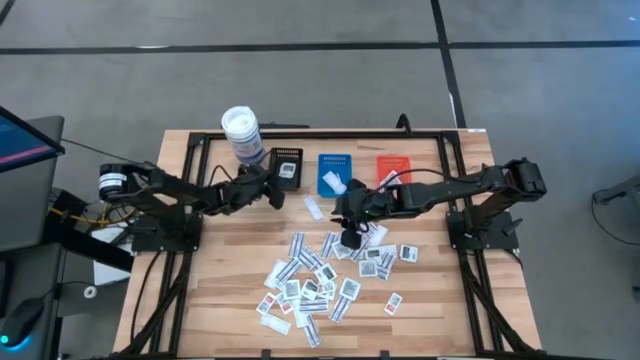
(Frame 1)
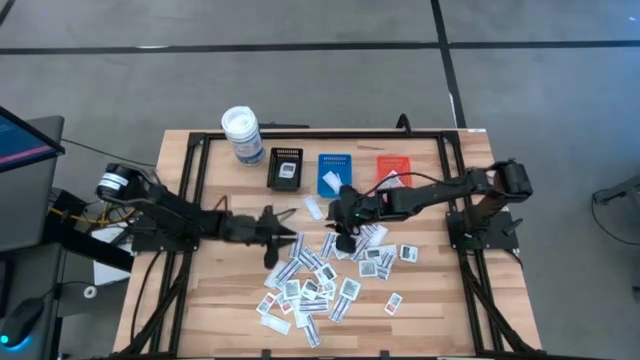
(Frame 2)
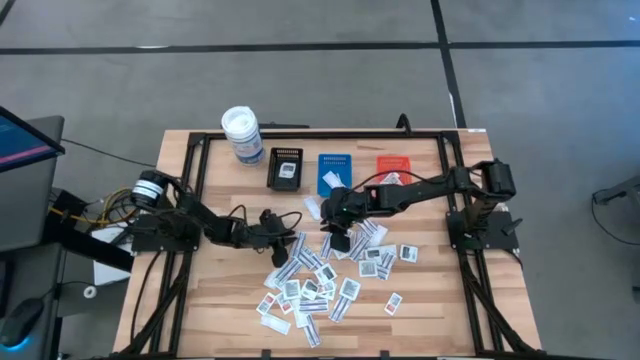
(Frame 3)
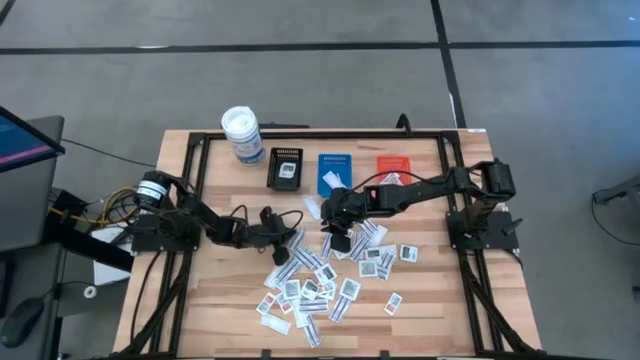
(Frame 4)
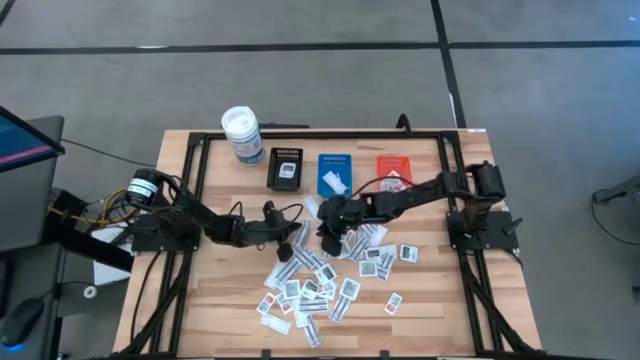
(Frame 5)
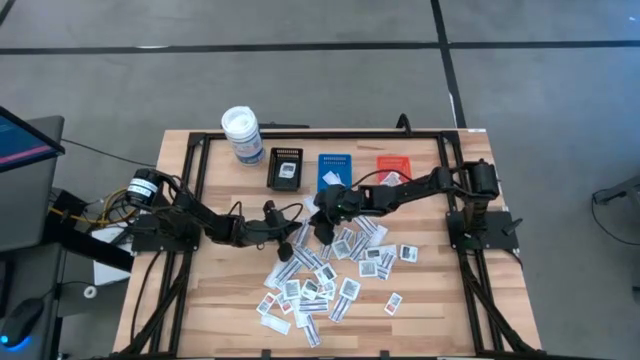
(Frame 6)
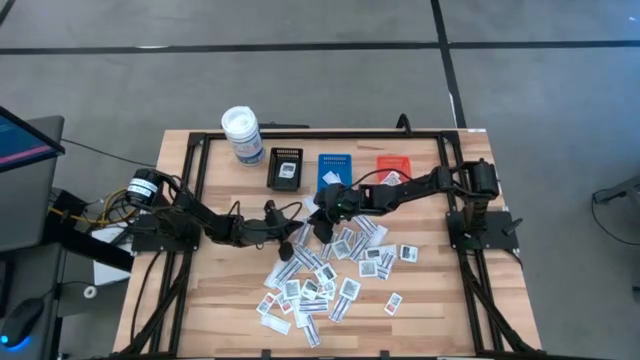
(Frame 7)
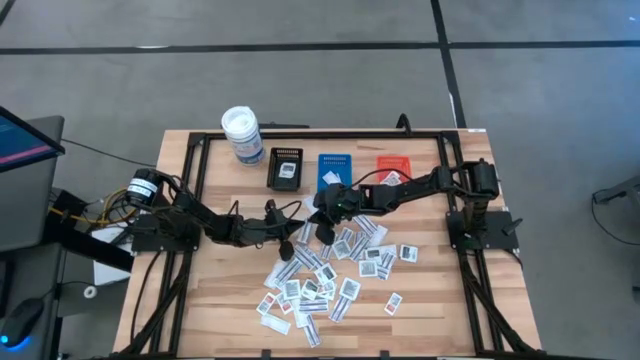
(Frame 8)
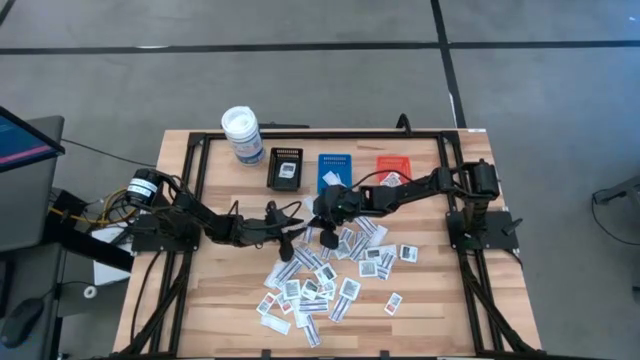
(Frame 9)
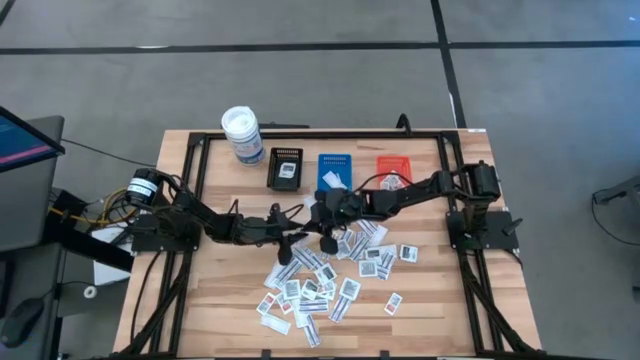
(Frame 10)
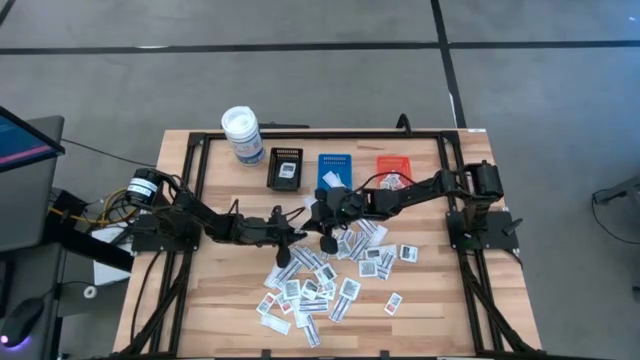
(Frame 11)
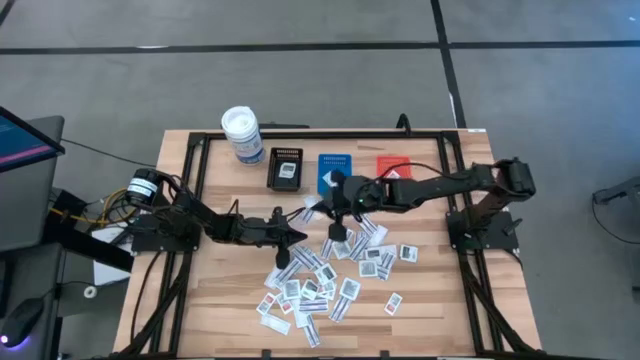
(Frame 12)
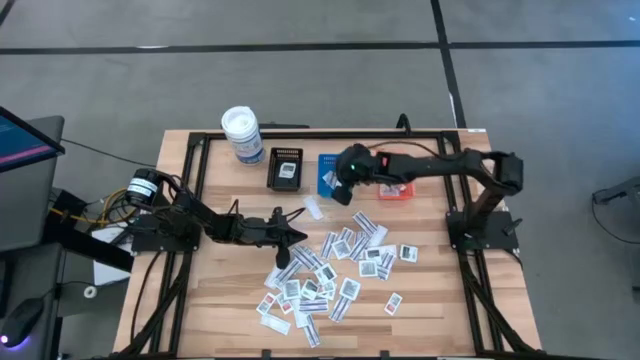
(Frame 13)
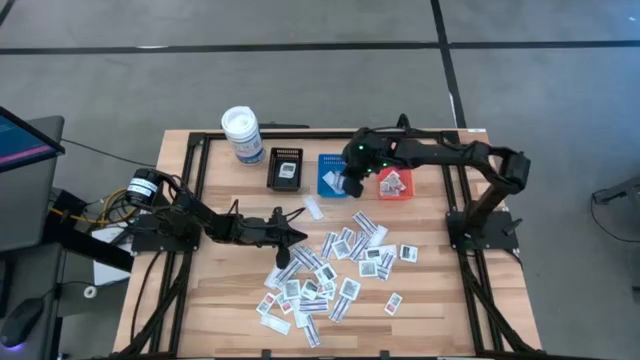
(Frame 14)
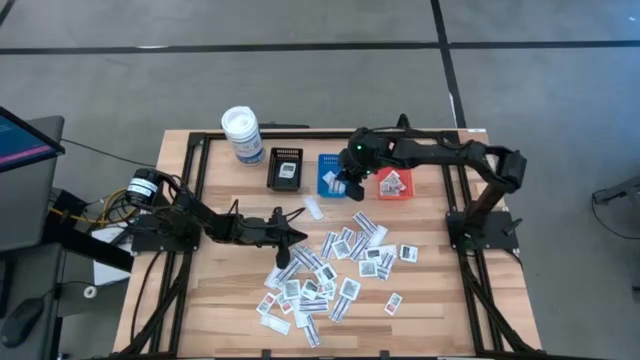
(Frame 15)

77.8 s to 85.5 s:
Task: Pick & Place First Aid Supplies
Put the blue bandage into the blue bin

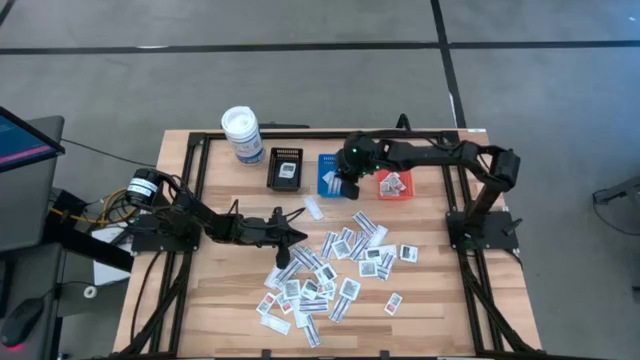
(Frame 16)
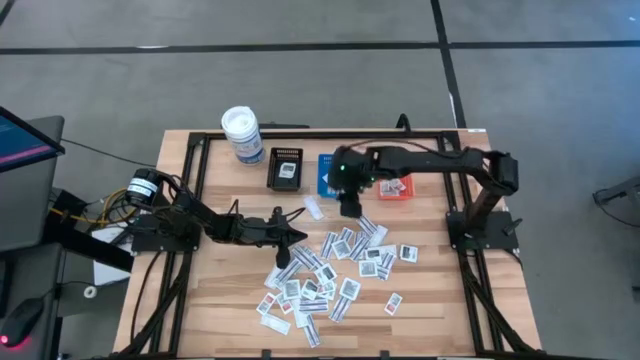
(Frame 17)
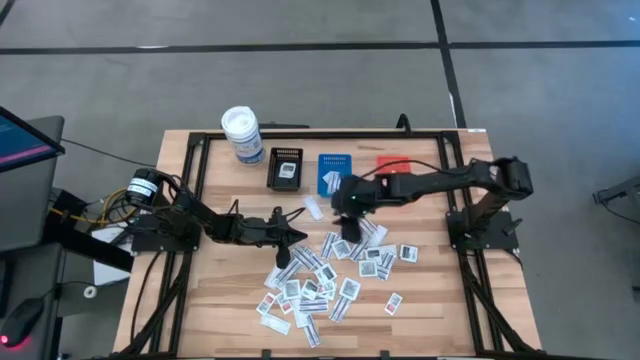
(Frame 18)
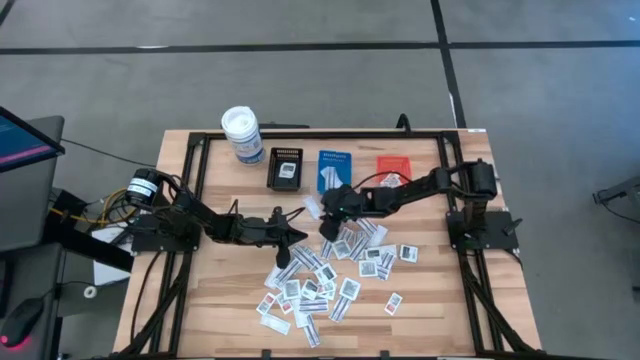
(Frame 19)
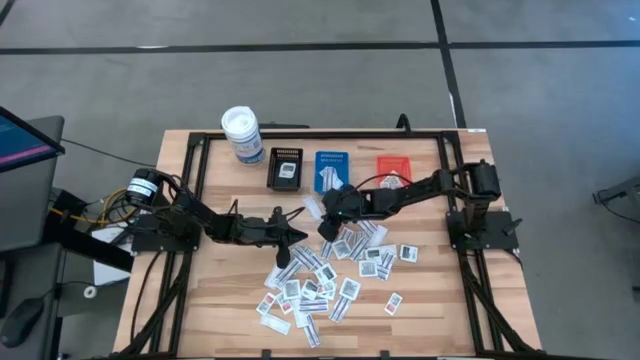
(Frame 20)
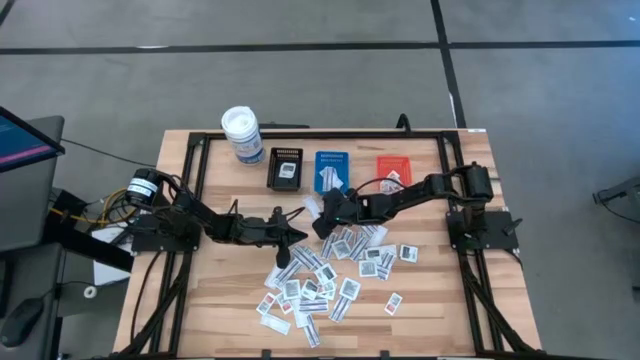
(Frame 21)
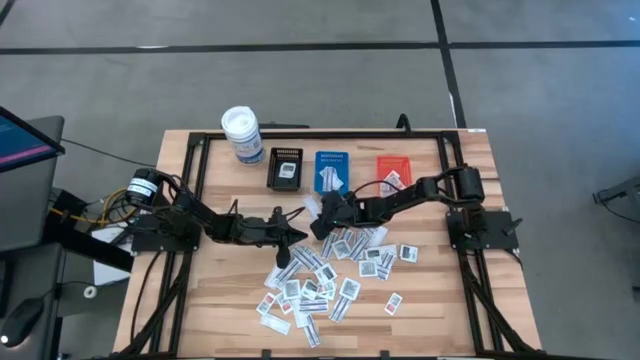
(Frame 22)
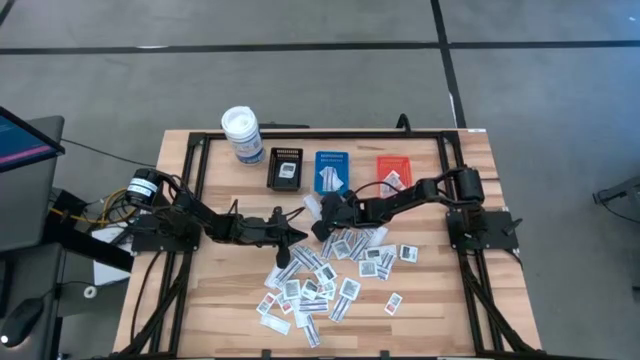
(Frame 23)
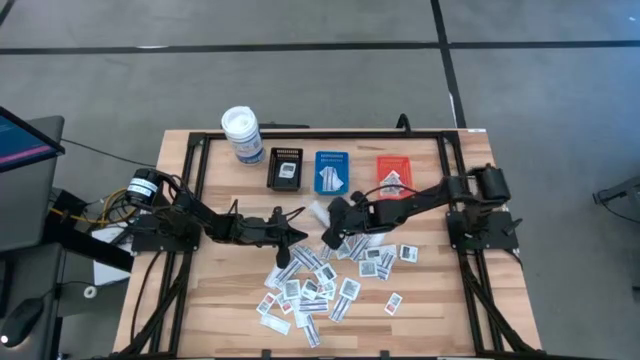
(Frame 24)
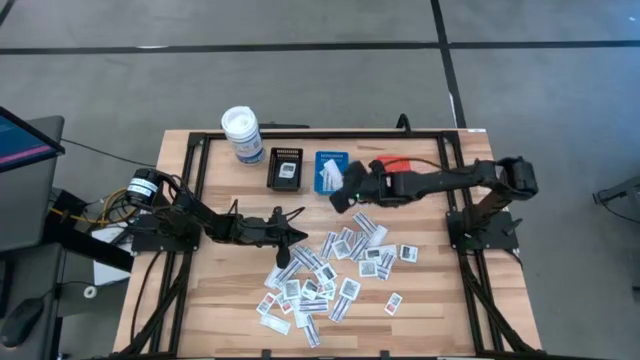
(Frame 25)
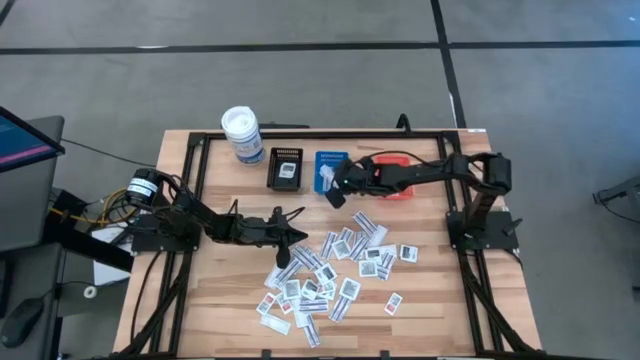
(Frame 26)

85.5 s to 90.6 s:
Put the blue bandage into the blue bin

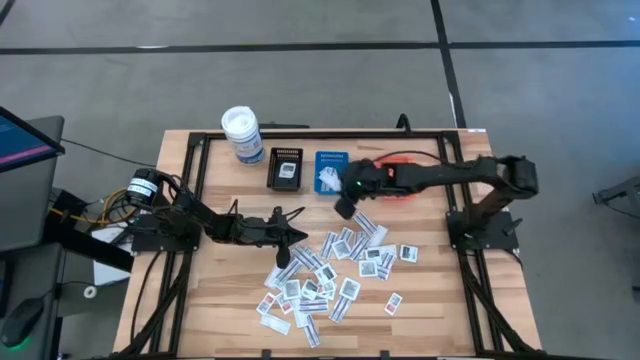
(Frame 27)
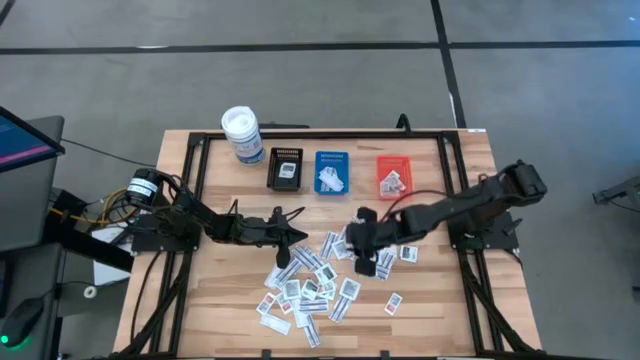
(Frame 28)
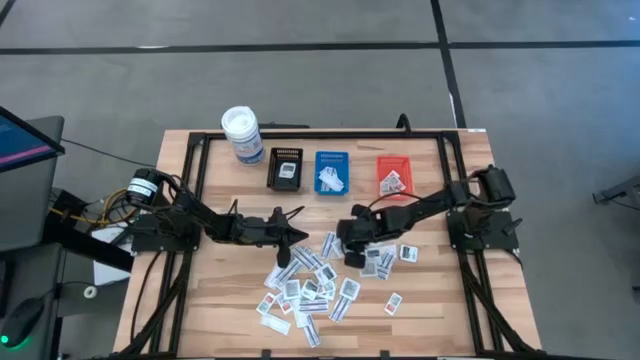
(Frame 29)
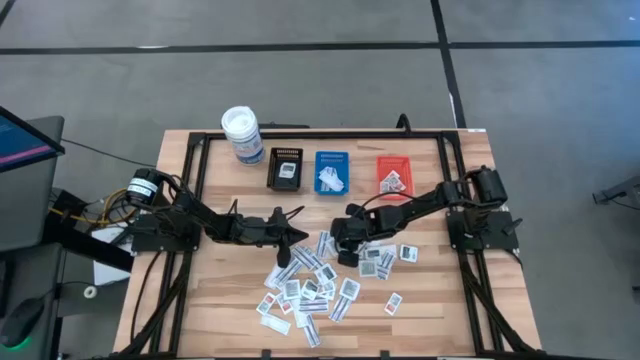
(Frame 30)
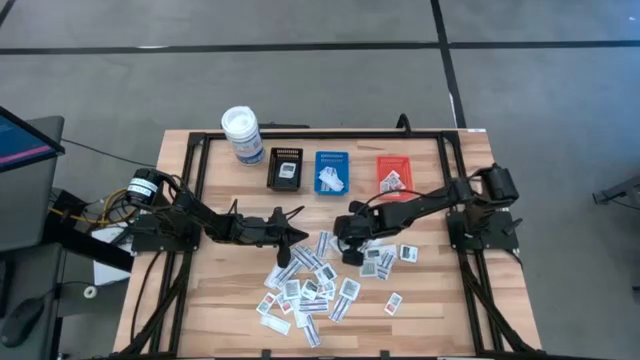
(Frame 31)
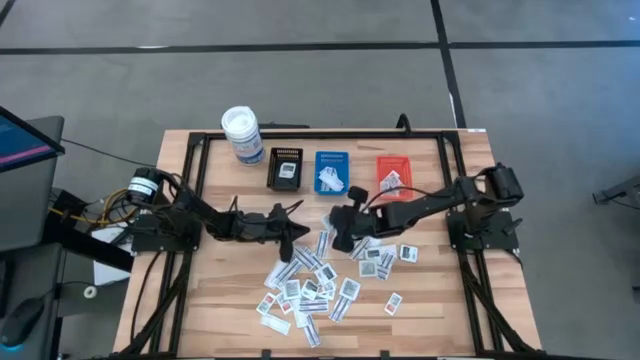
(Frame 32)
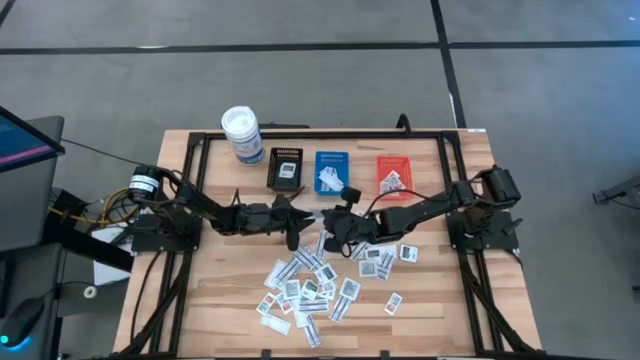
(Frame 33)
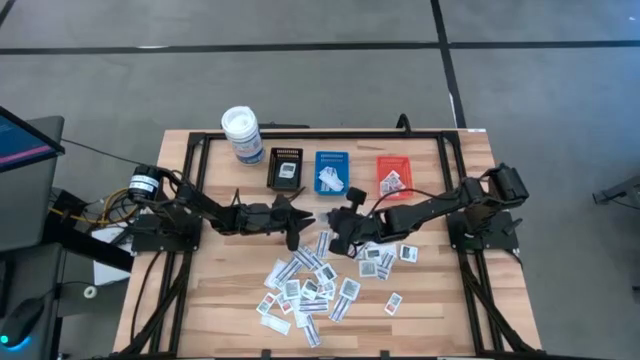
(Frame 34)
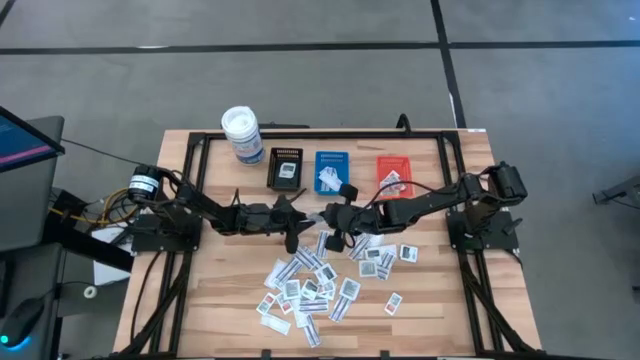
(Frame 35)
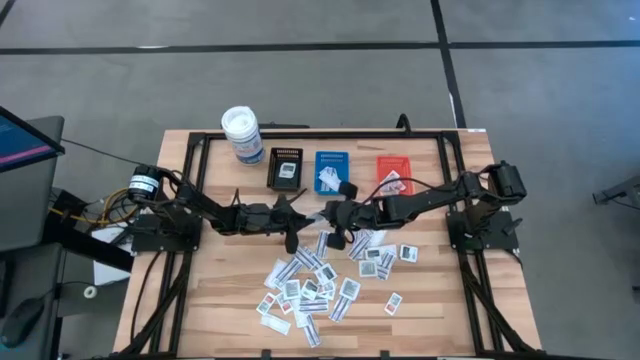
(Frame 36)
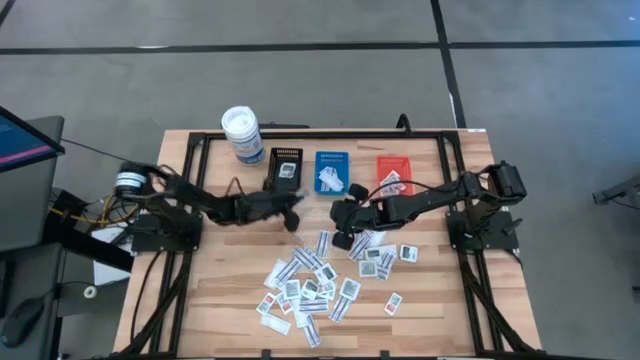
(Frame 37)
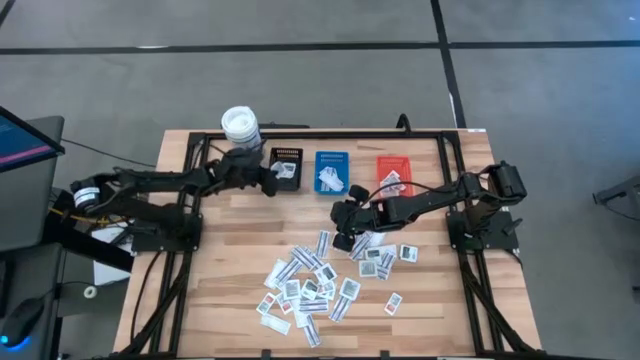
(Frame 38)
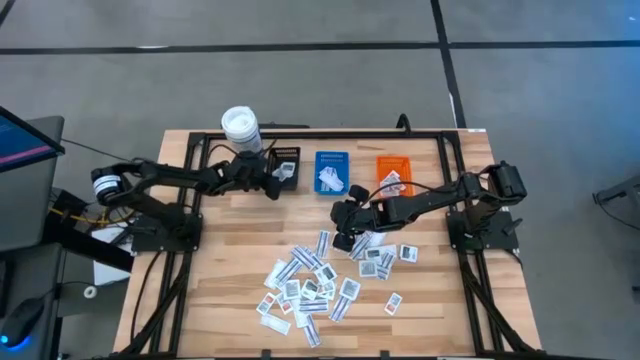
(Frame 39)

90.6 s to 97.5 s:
Put the black towelette pack into the black bin

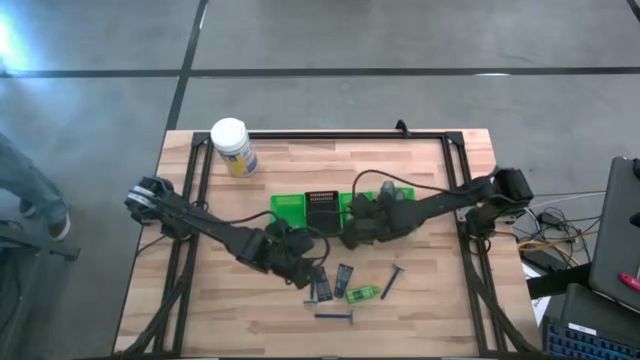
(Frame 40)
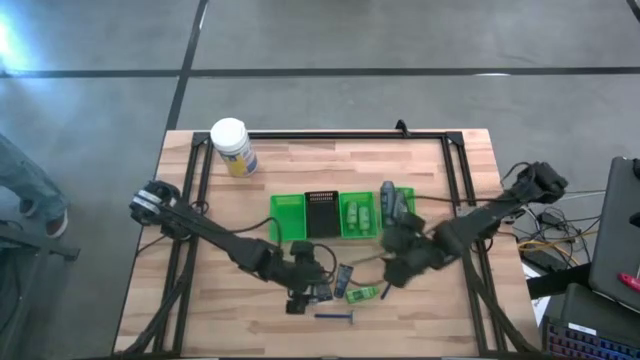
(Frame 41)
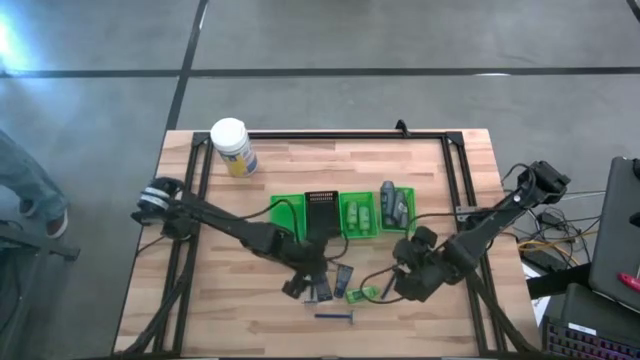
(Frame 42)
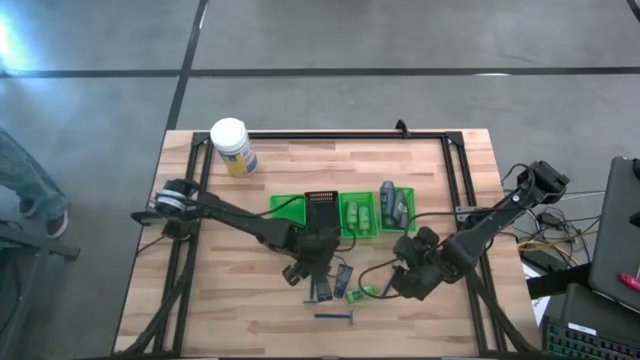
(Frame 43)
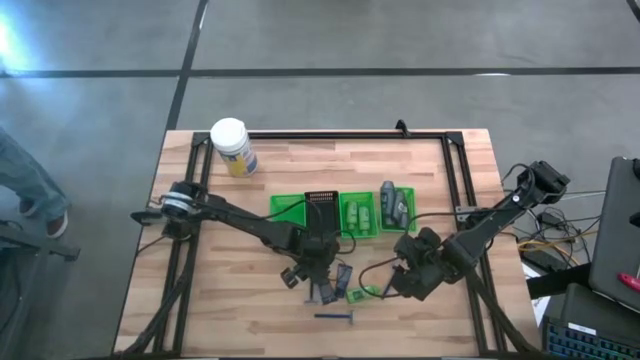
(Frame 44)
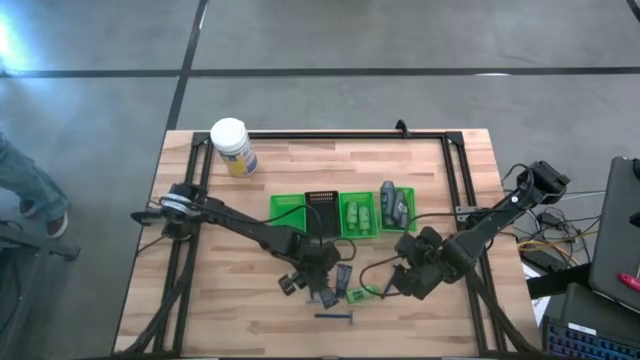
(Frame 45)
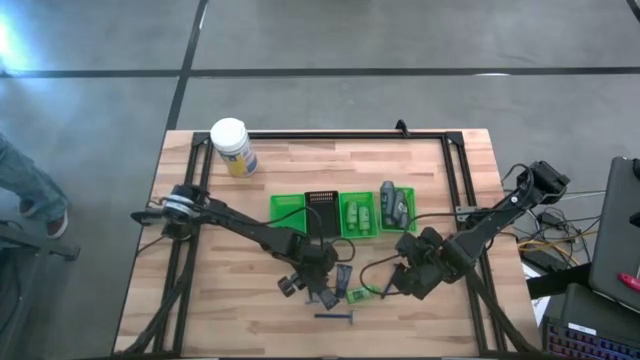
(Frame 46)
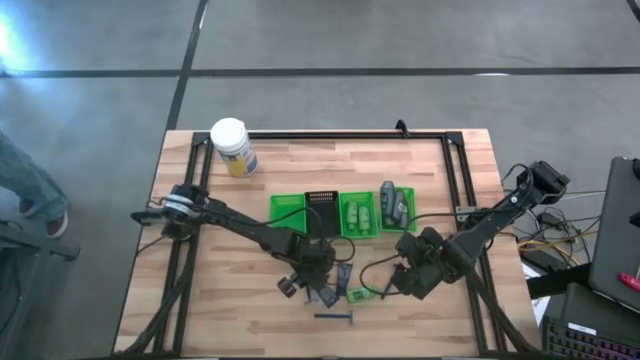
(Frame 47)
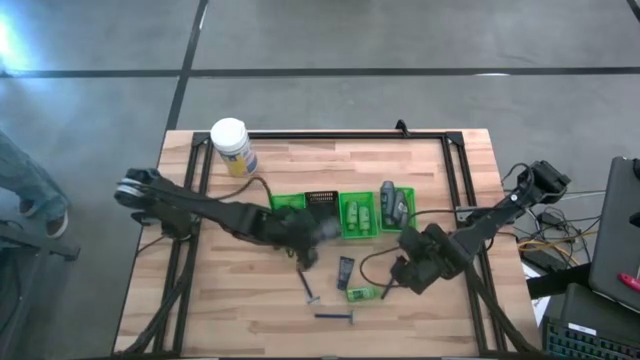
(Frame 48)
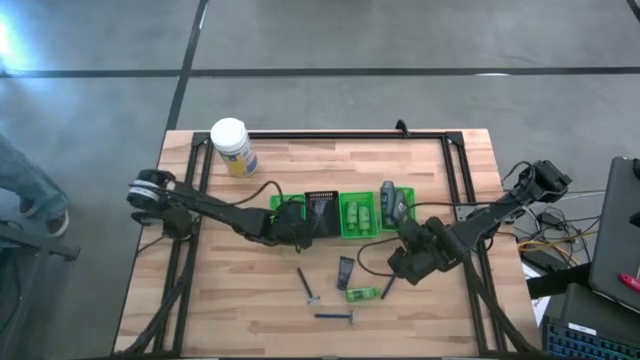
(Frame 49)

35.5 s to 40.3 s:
Task: Pick & Place Travel size toiletries
Put the black shave cream into the black basket
